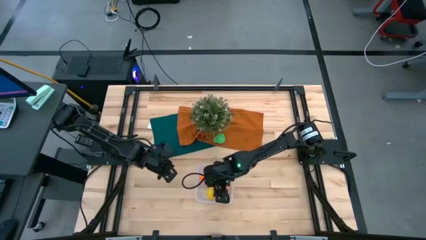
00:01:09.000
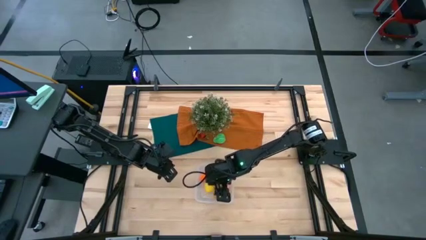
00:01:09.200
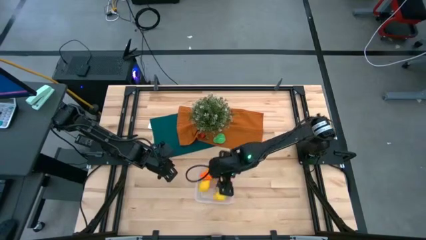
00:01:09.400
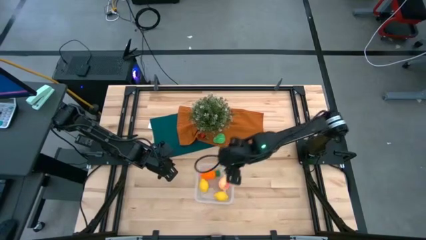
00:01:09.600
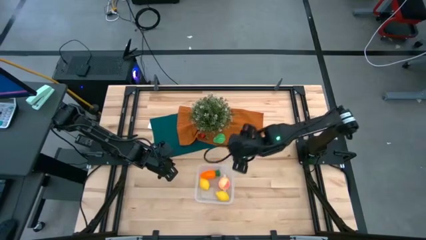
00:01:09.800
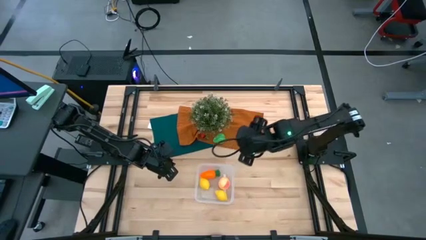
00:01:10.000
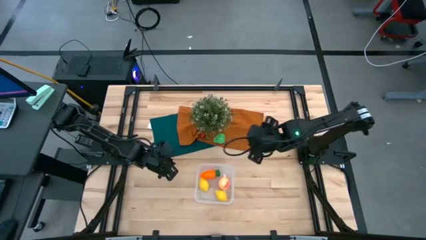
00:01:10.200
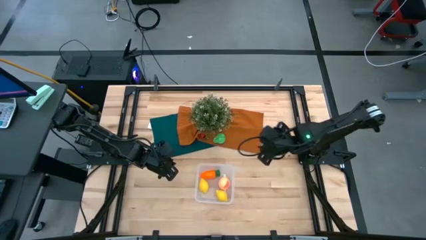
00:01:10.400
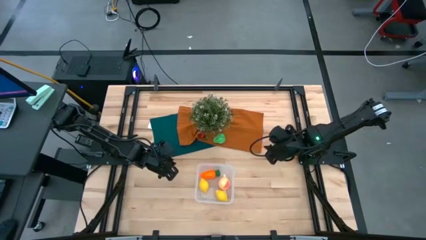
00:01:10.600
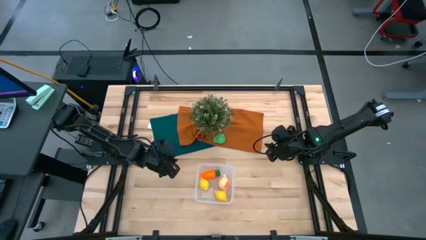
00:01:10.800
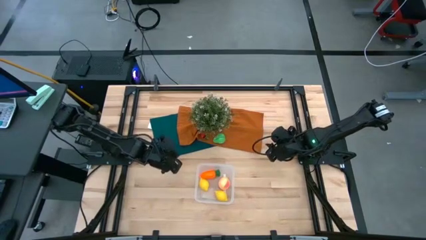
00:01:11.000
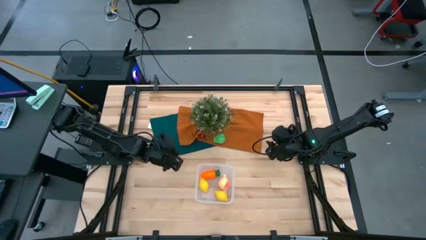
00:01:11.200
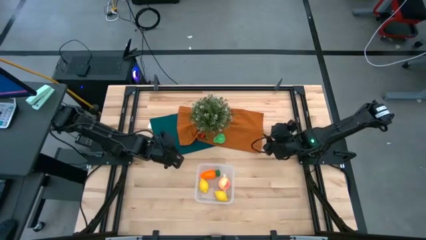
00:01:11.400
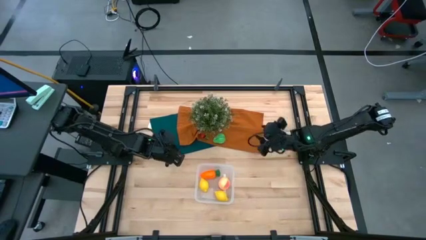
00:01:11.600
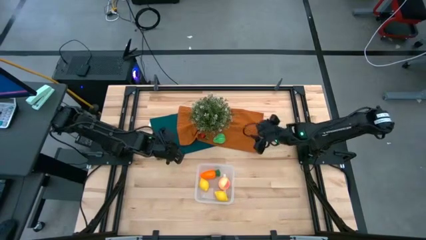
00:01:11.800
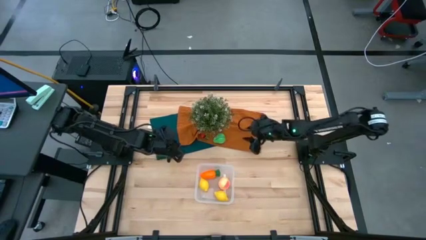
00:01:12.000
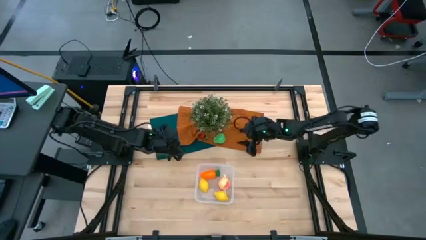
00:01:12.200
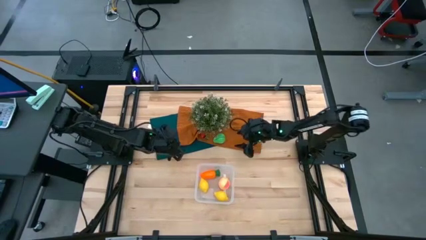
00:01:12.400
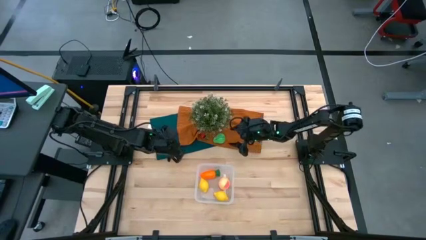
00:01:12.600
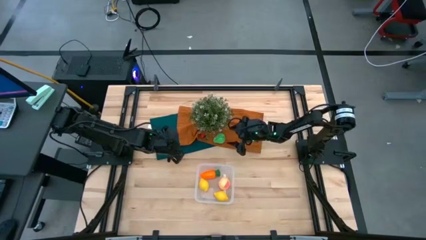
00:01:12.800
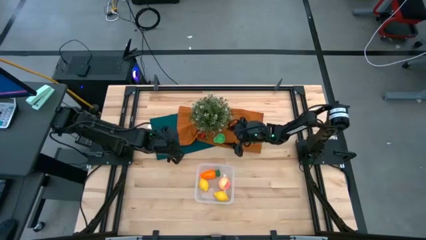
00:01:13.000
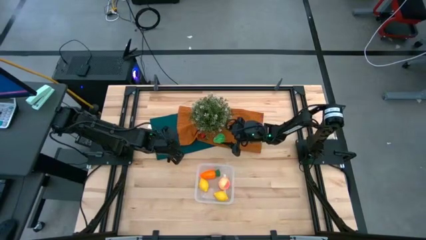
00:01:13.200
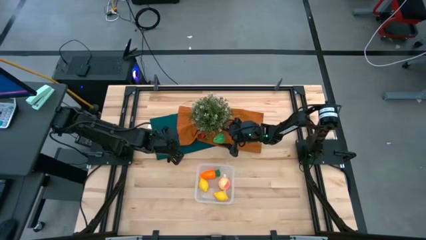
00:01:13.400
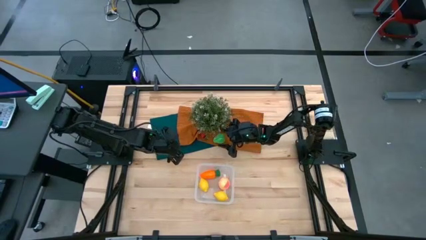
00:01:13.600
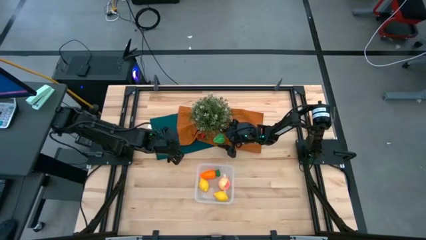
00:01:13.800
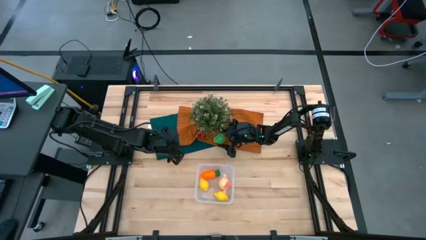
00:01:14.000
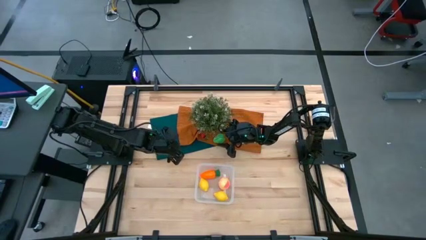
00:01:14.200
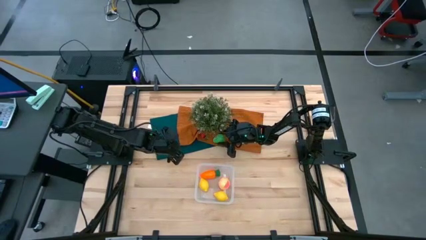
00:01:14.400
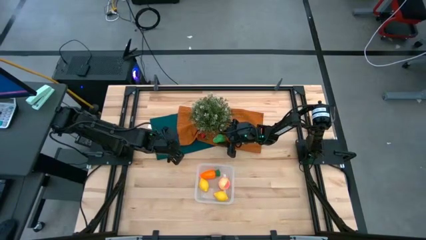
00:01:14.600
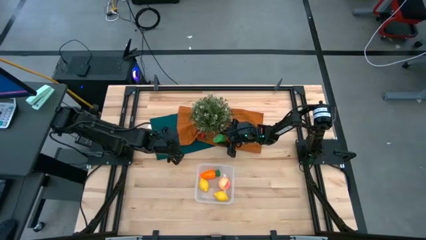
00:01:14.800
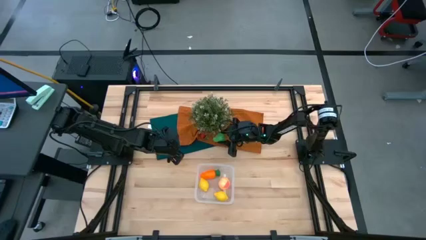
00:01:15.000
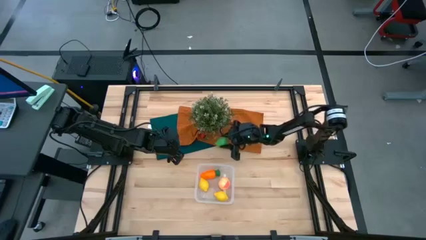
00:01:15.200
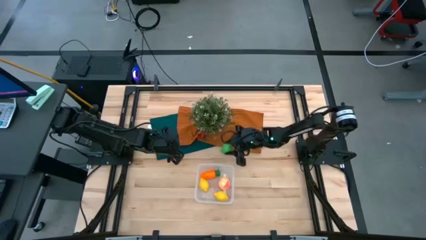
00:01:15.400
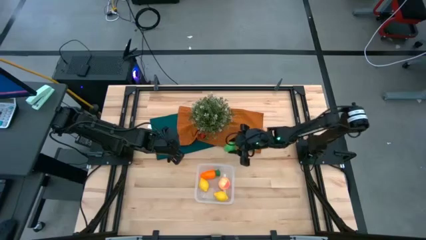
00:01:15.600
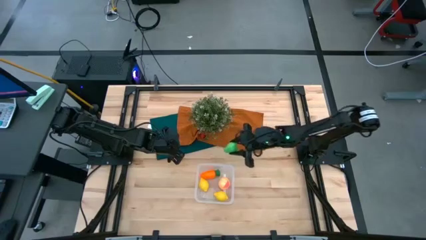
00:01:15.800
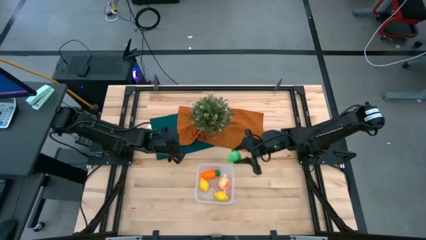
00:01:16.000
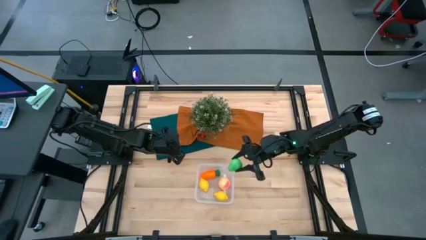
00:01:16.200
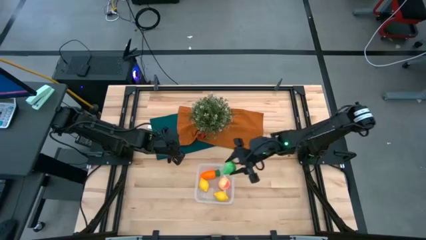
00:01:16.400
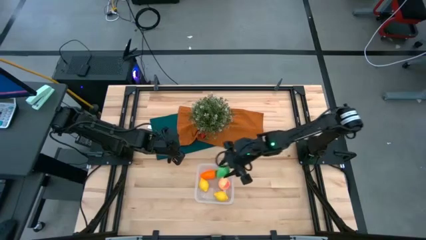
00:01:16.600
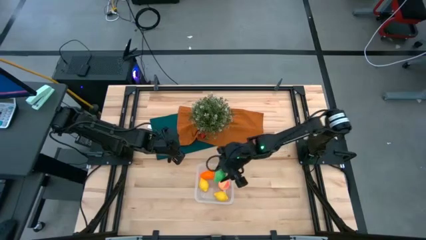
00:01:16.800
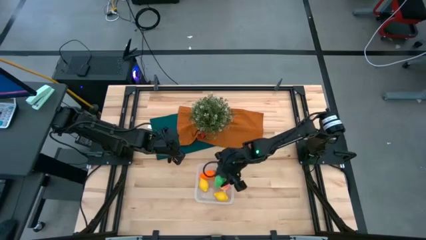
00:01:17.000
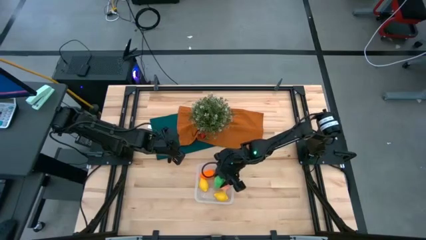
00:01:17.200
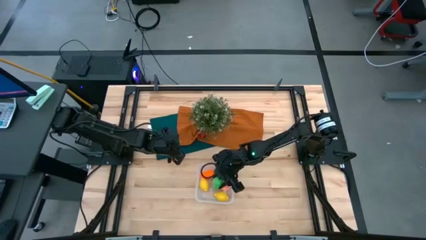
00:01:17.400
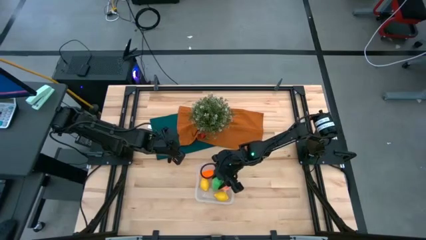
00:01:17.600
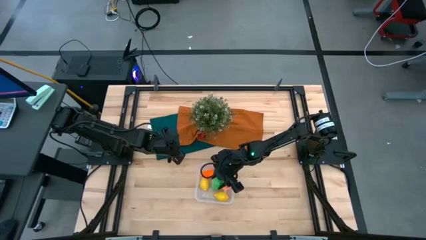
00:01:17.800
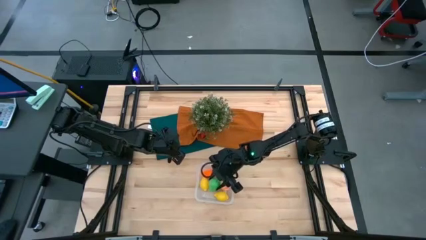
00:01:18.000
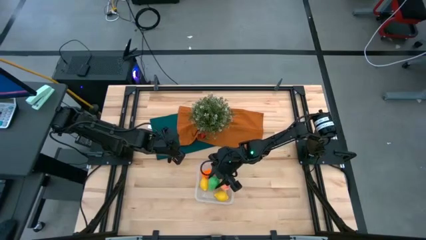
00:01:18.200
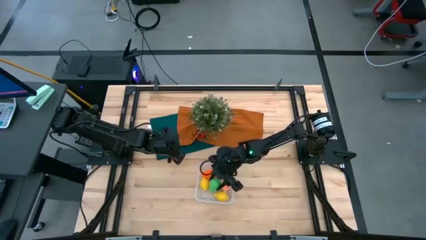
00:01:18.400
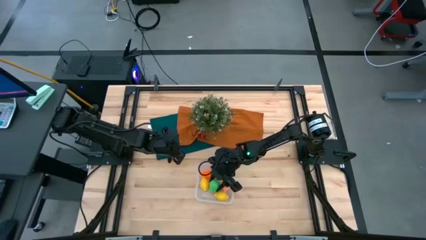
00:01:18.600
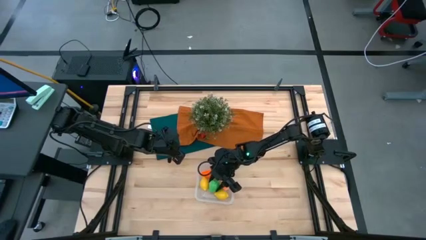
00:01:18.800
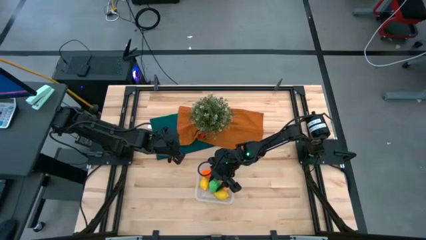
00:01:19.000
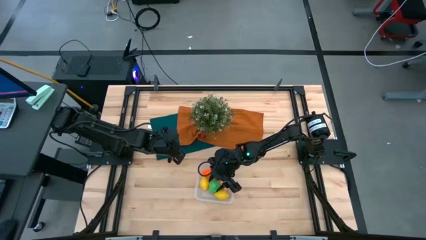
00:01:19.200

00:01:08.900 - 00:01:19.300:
Task: Pick and placing Produce into tupperware
Put the pear into the transparent bin

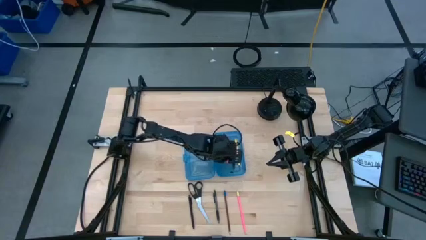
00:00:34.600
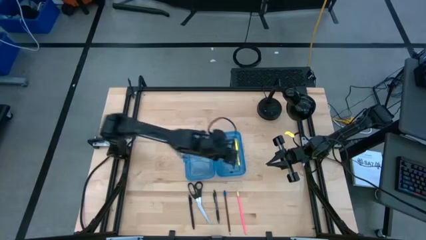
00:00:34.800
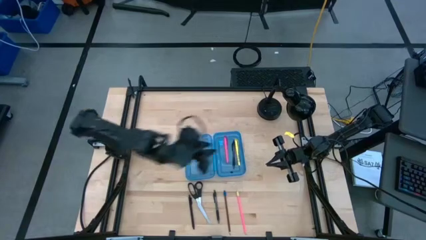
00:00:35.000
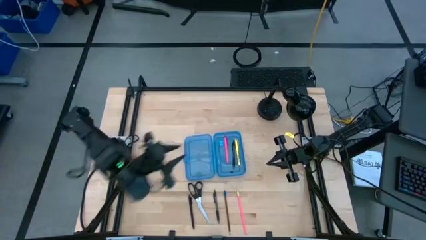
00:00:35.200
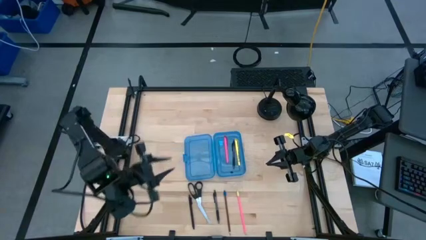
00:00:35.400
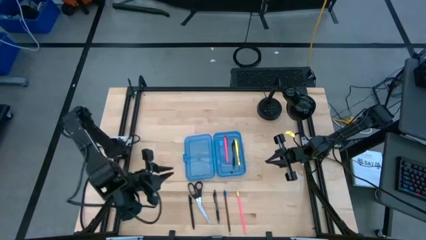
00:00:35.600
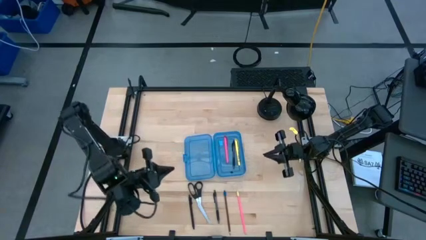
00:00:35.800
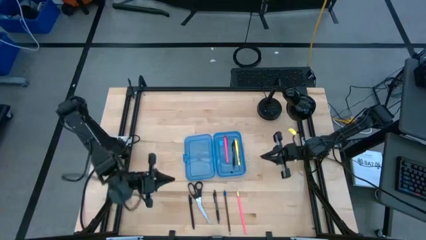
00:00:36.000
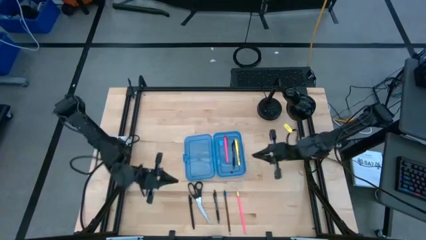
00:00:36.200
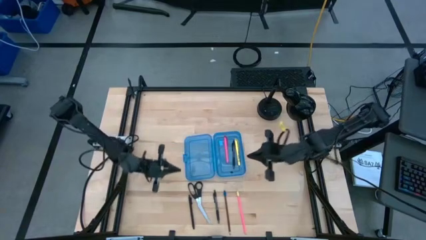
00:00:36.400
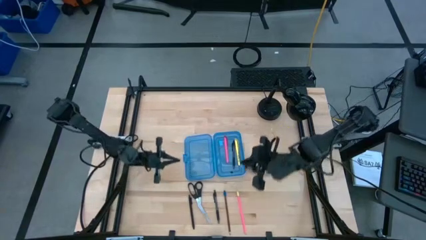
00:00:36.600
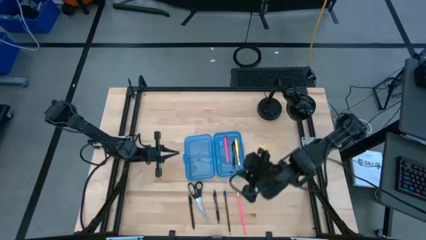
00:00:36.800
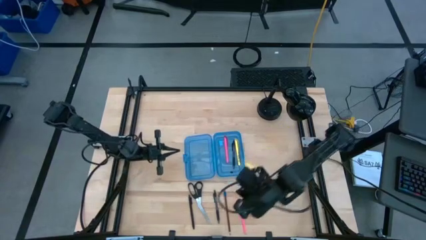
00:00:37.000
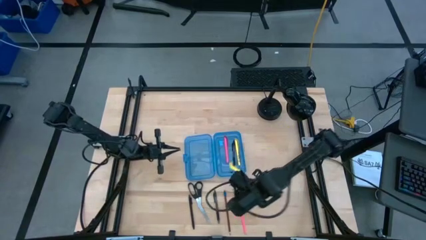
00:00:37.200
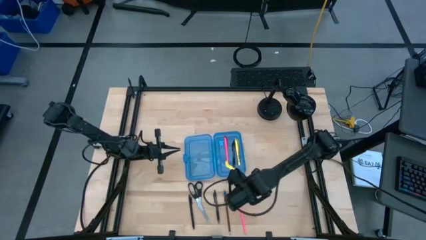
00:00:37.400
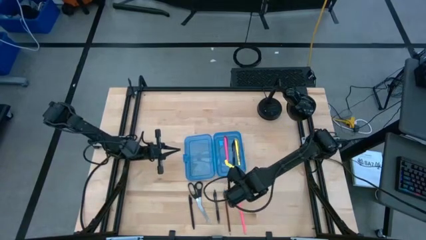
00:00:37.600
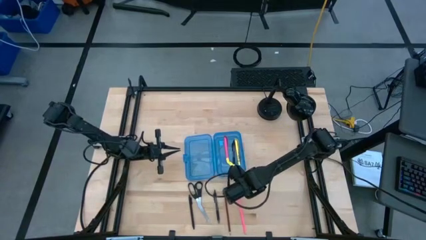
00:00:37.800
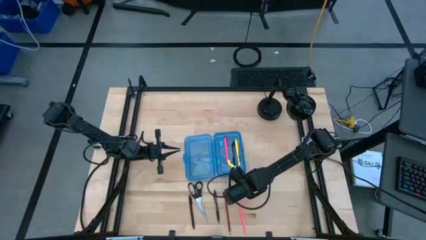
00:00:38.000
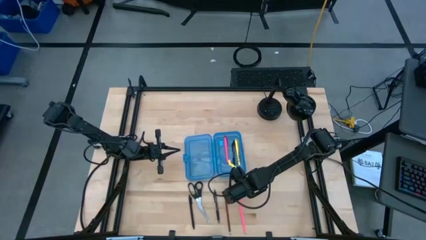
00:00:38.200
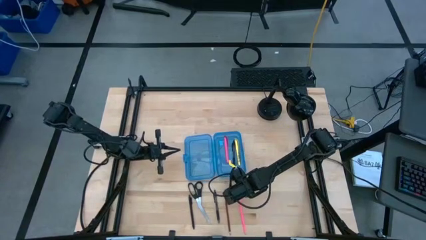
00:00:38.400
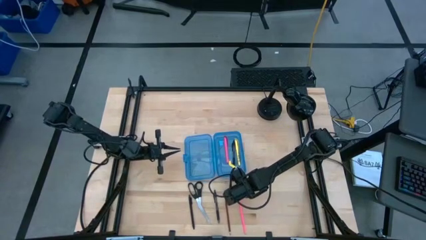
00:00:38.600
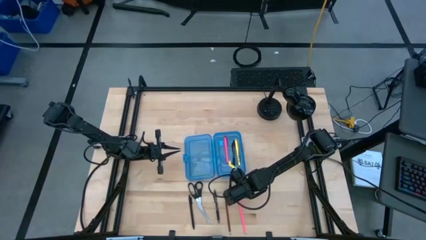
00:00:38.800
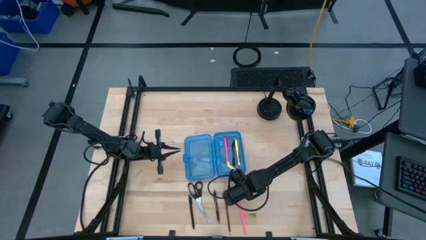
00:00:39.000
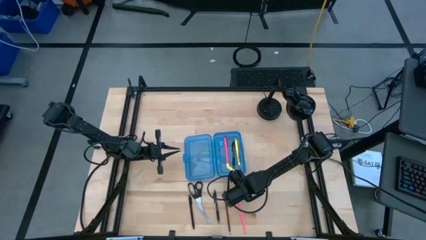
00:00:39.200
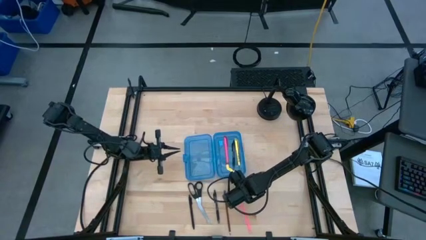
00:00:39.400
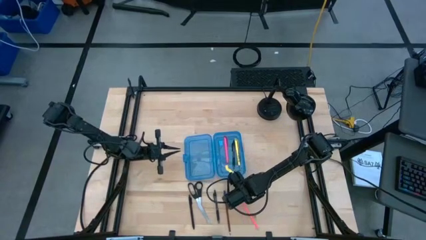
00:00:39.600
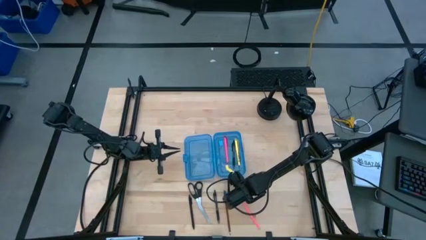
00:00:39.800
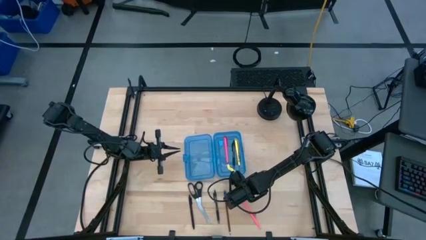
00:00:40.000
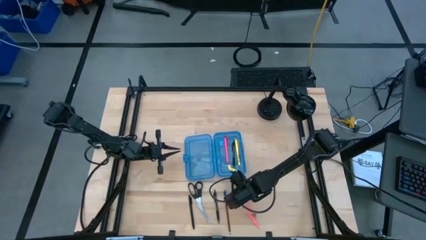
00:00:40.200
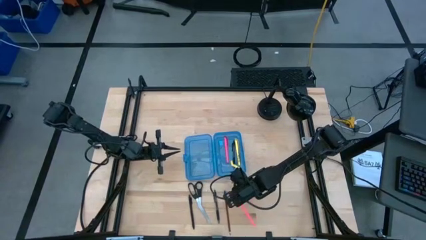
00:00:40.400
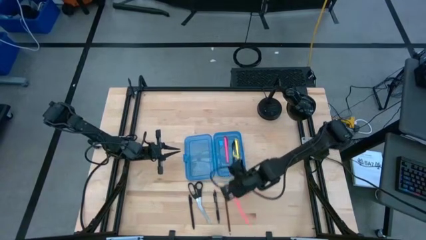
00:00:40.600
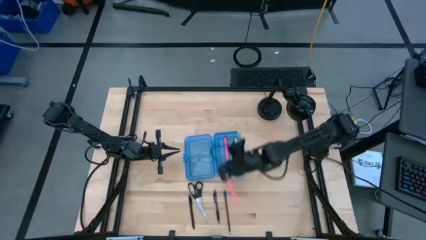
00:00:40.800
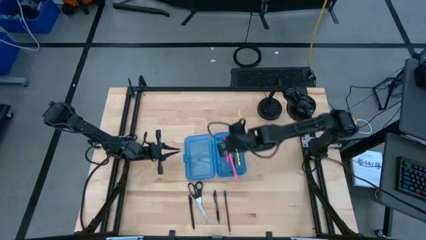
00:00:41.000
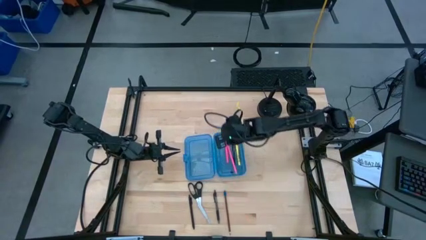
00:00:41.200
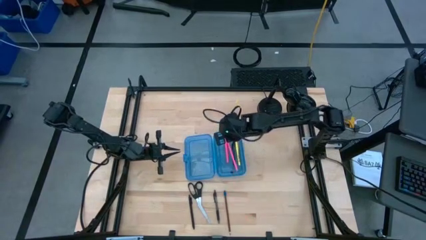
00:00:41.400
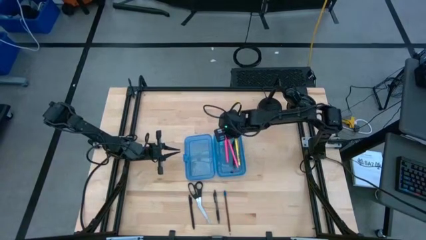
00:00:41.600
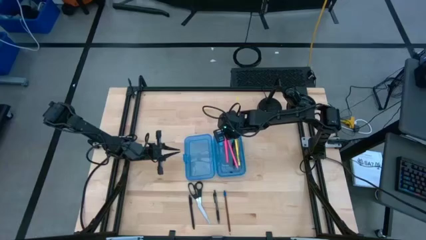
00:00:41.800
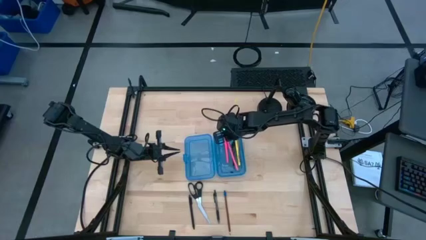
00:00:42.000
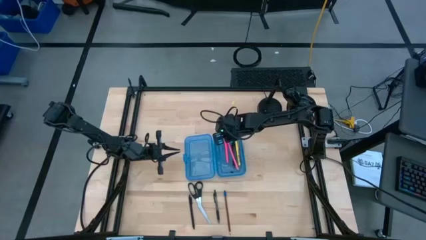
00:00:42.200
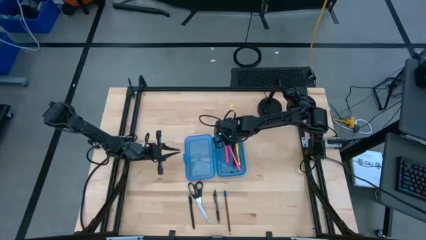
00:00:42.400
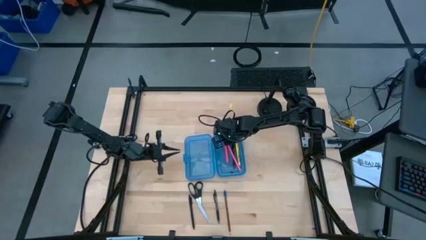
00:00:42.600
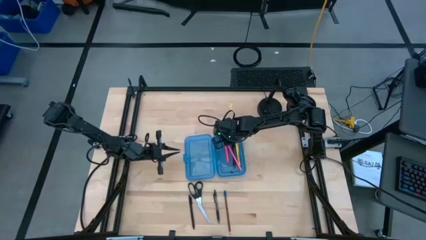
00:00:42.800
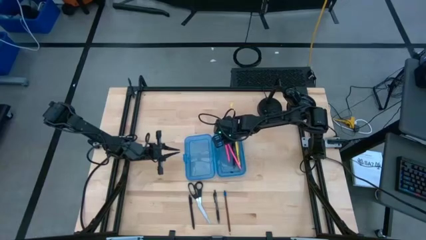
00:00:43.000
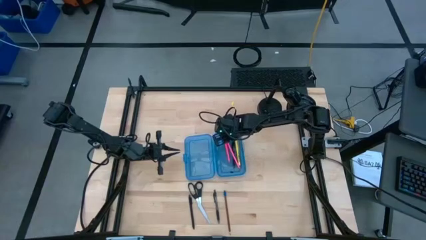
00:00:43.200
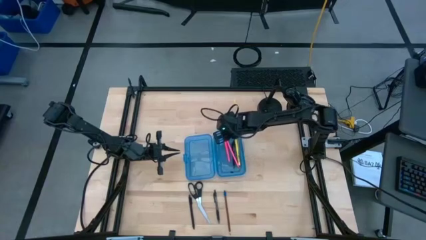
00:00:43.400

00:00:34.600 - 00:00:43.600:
Task: Pick & place school supplies into a supply box
Put the pink pencil into the blue supply box
